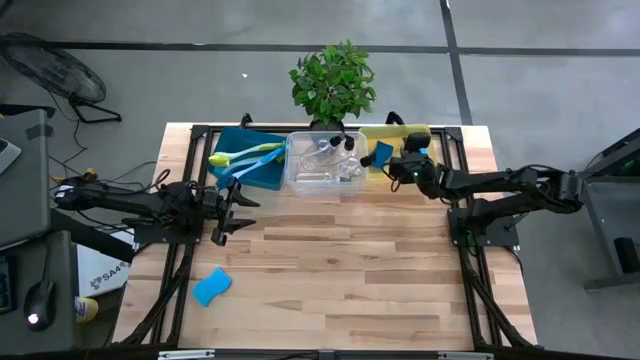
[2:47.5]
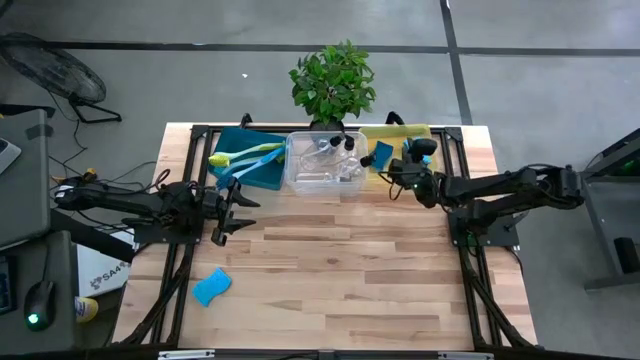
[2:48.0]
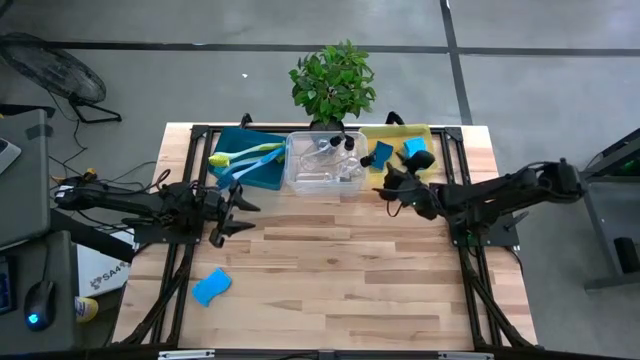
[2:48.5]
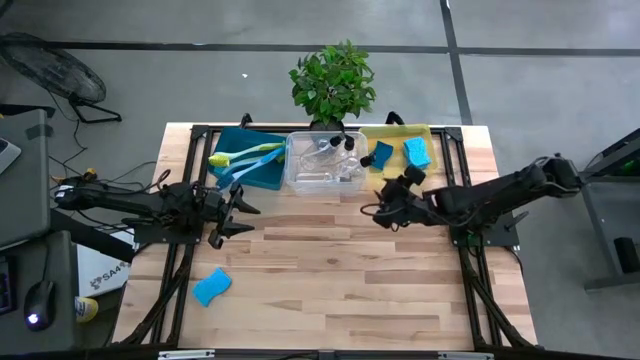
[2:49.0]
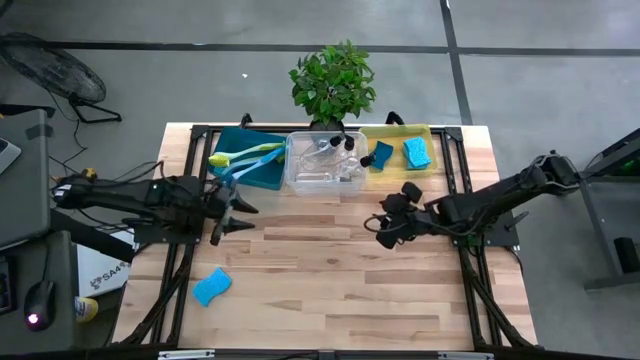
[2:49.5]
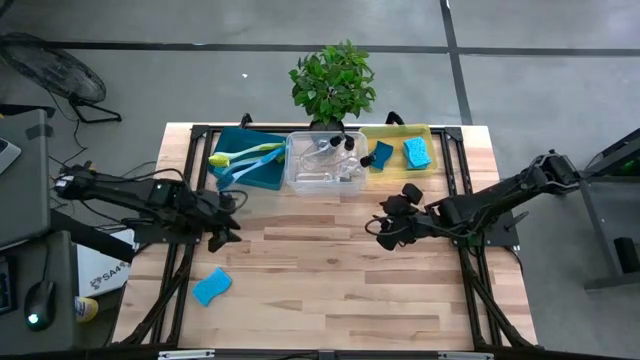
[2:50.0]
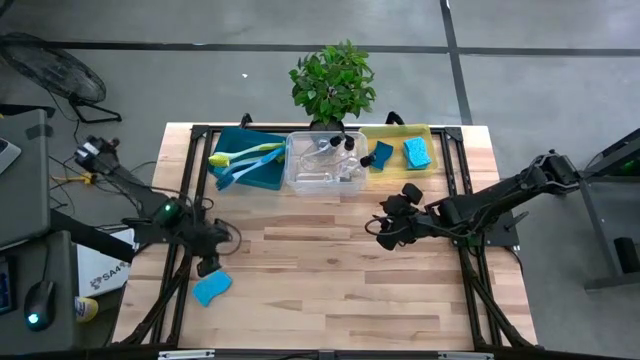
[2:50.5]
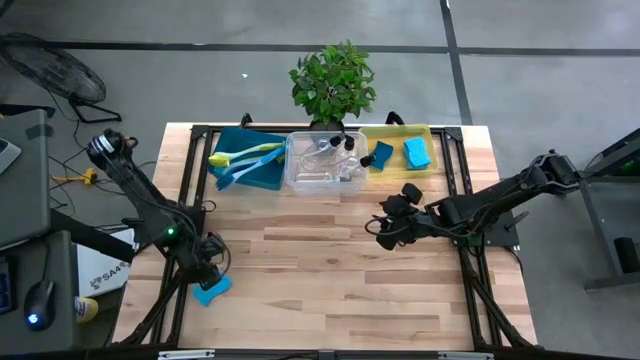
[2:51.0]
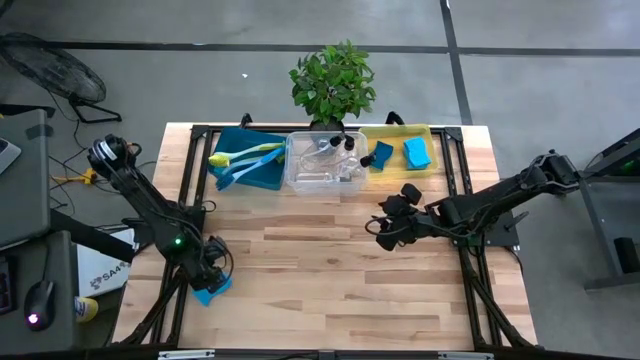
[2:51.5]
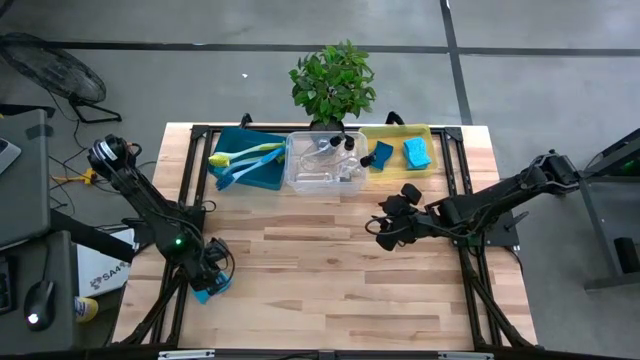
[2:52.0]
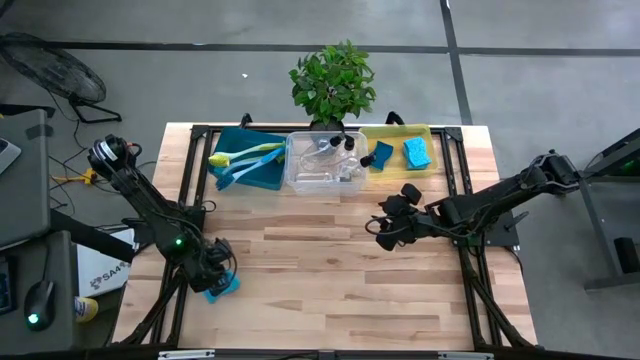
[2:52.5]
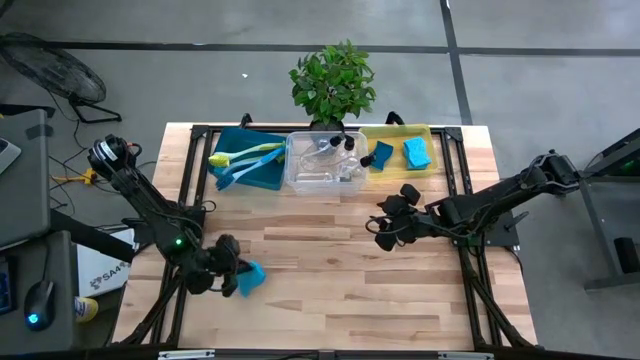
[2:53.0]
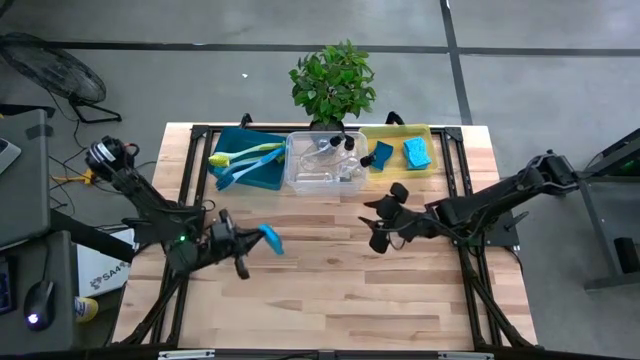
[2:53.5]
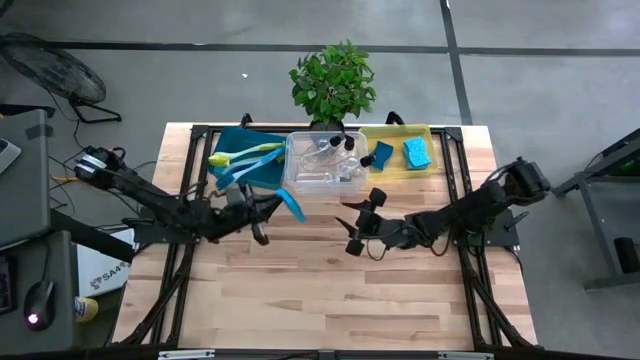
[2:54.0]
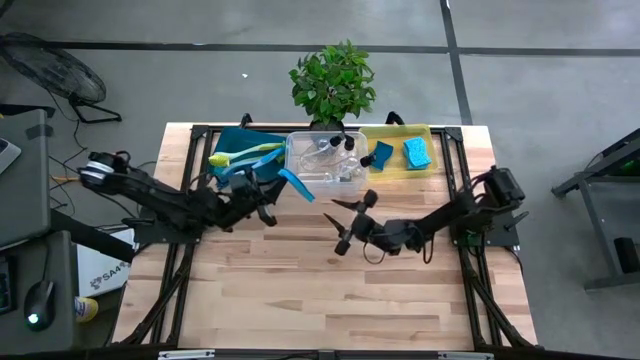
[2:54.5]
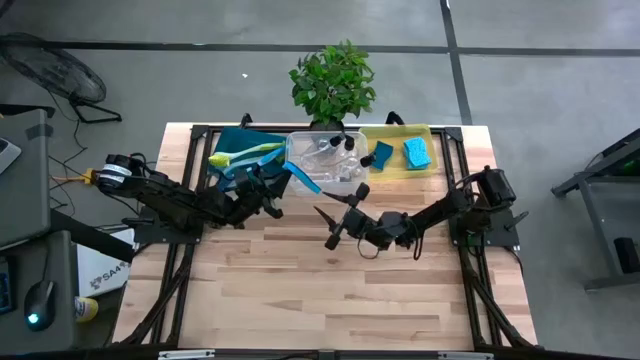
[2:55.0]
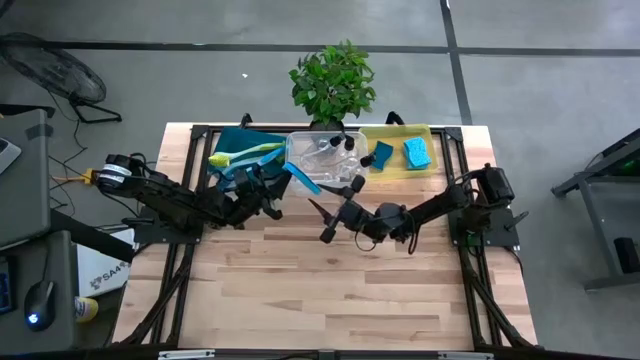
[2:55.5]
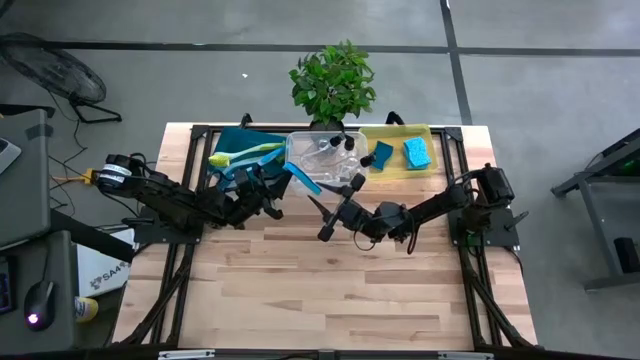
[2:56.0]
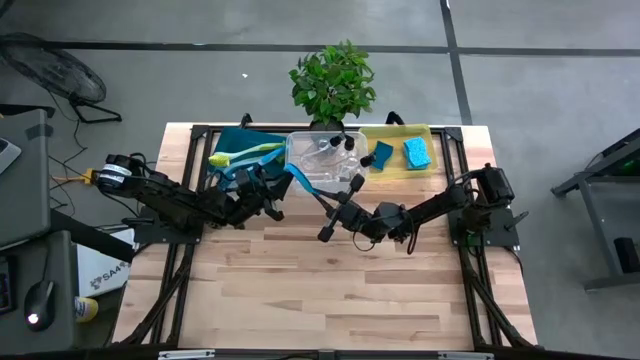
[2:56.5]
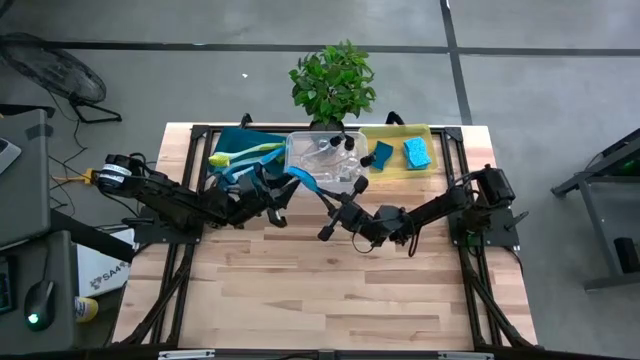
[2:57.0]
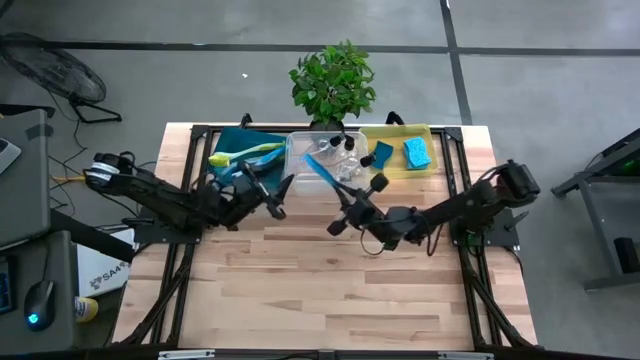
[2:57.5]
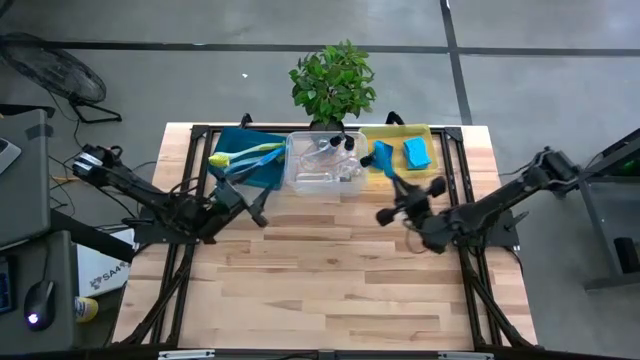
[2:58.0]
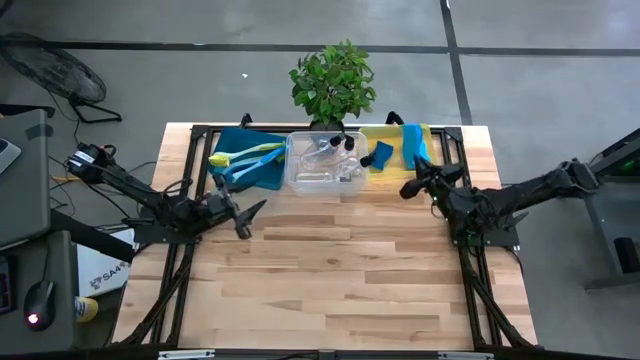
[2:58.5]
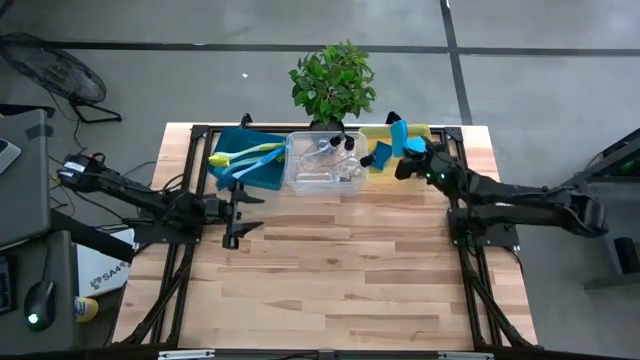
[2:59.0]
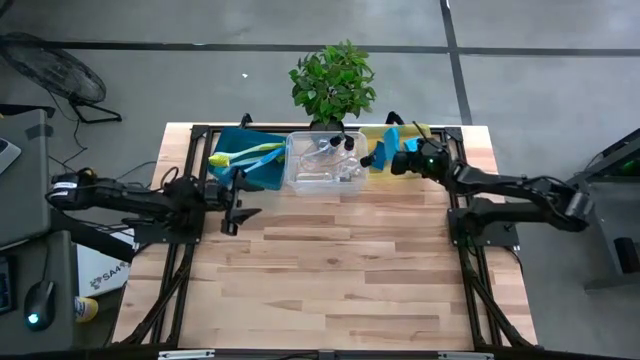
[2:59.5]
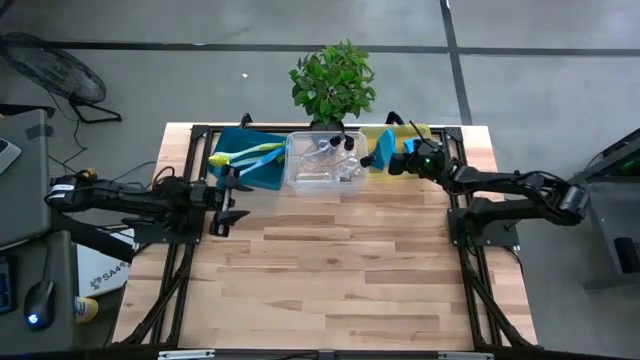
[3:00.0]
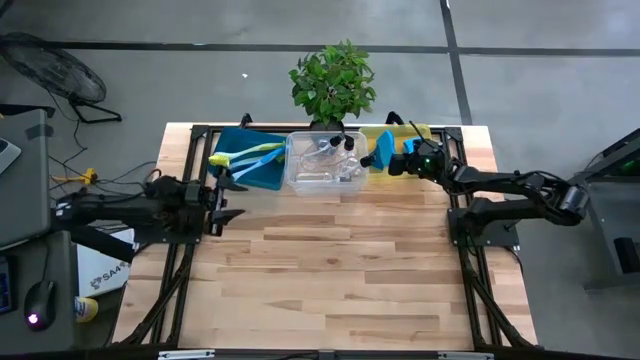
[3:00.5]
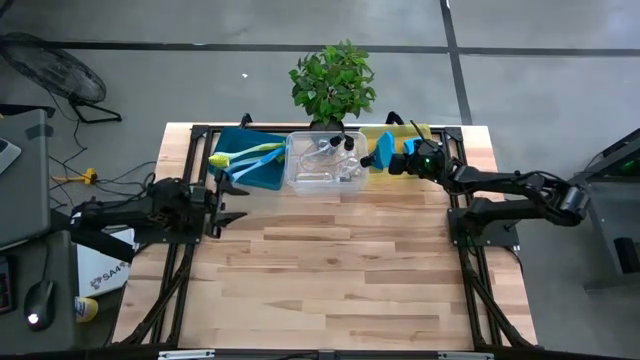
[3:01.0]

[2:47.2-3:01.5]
Task: Pick & Place Kitchen Sink Supplies
Put the light blue sponge into the yellow bin

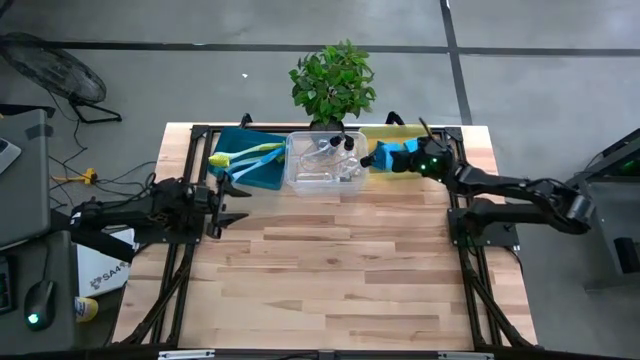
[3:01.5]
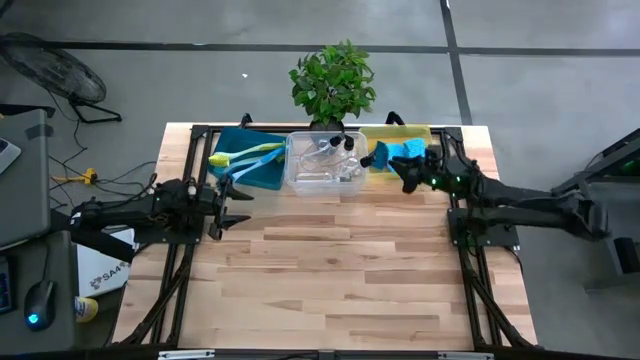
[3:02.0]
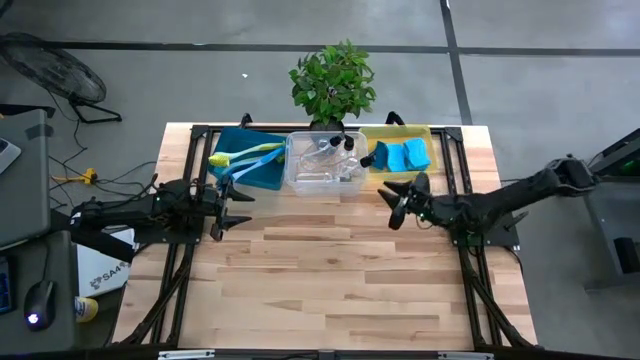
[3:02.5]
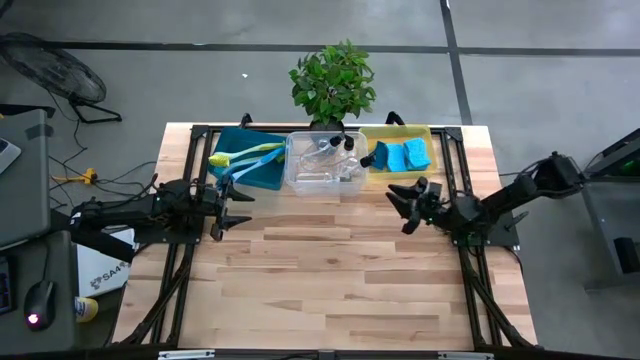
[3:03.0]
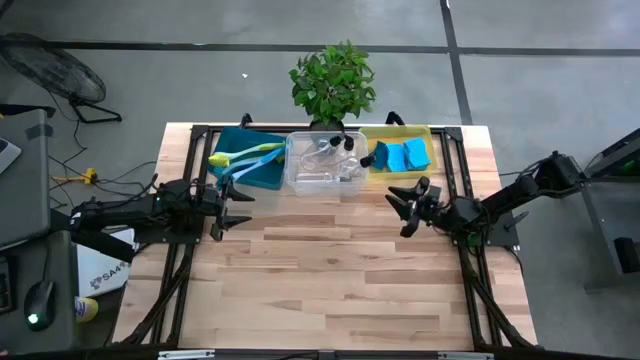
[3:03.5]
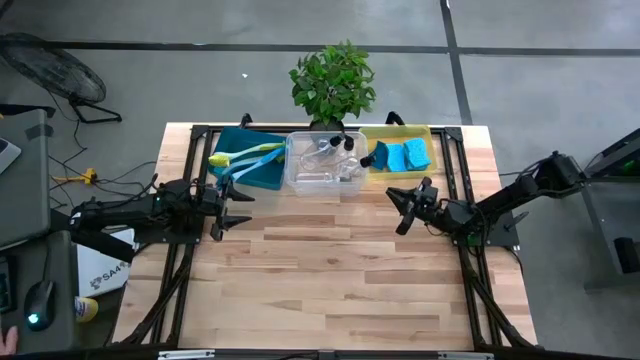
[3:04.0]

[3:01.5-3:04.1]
Return to Home Position

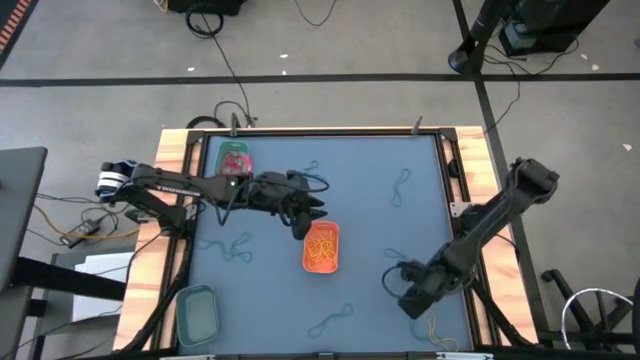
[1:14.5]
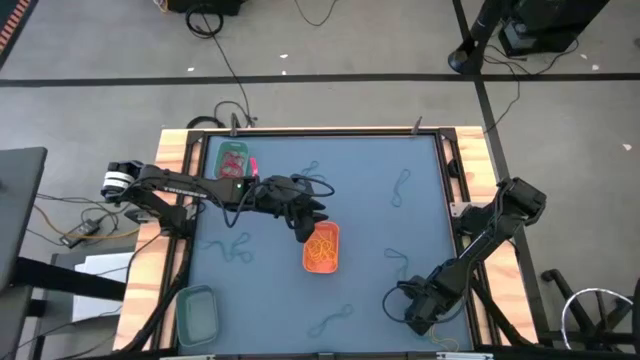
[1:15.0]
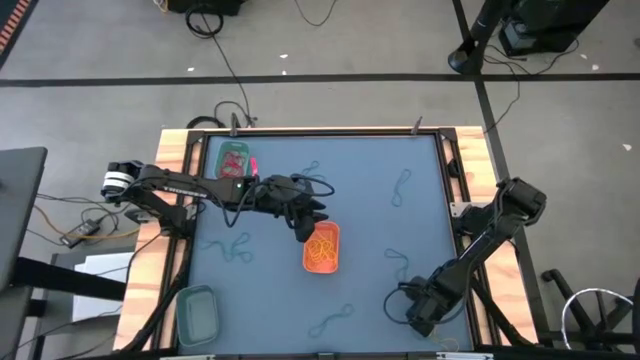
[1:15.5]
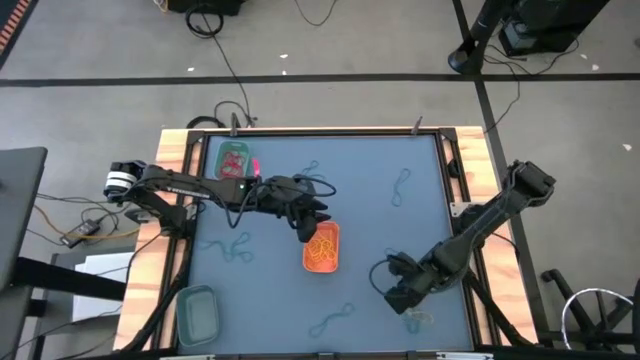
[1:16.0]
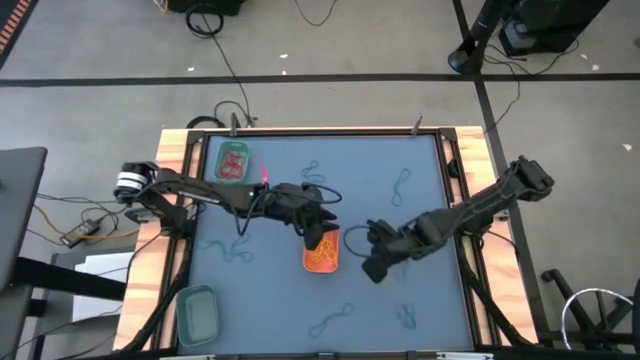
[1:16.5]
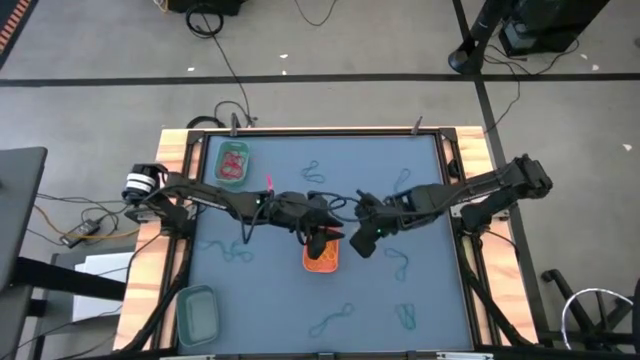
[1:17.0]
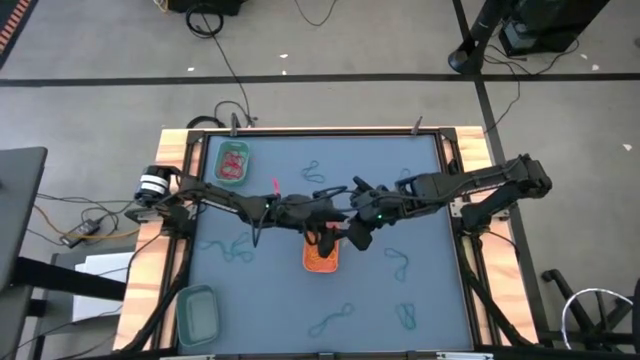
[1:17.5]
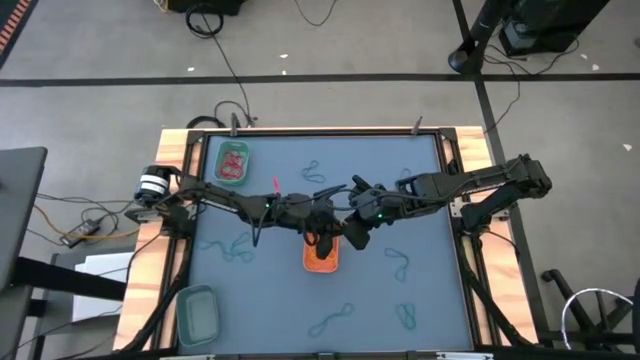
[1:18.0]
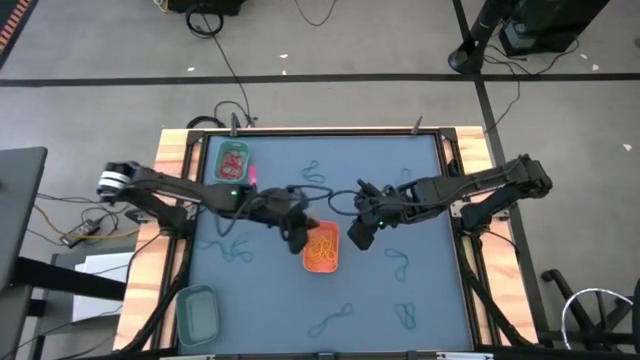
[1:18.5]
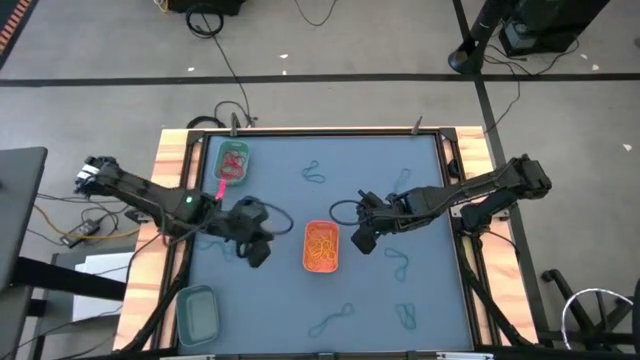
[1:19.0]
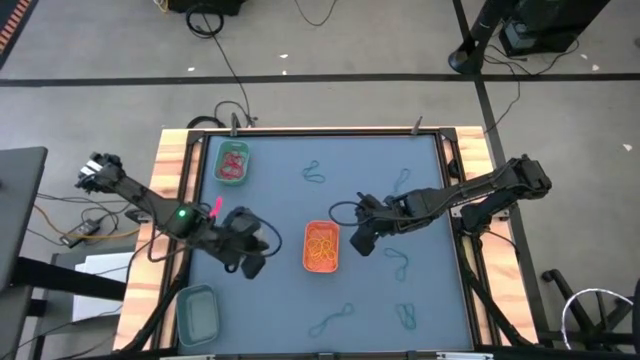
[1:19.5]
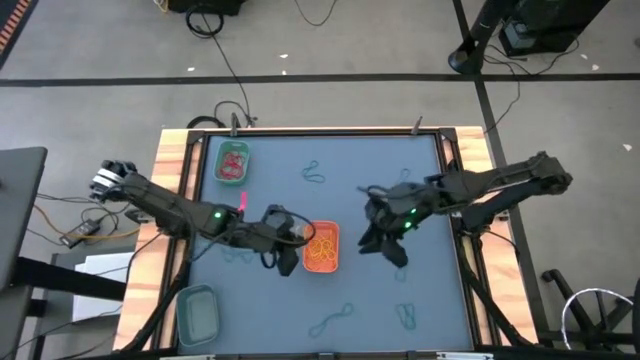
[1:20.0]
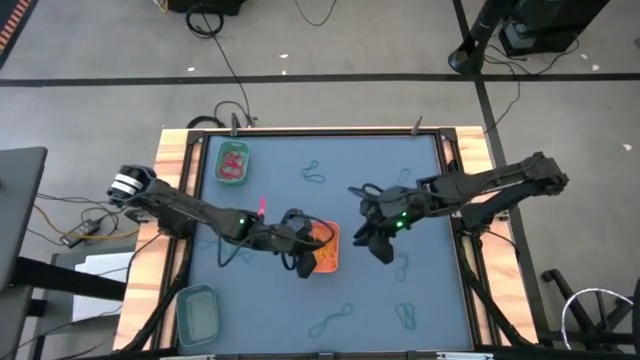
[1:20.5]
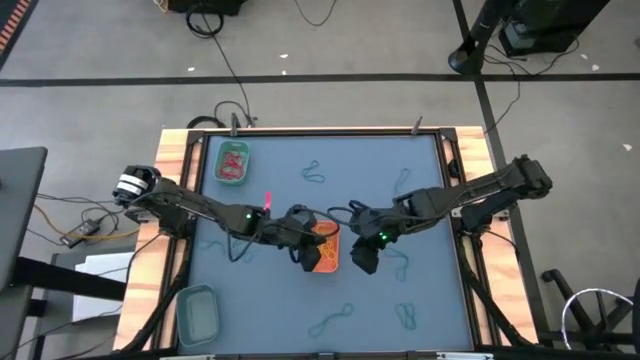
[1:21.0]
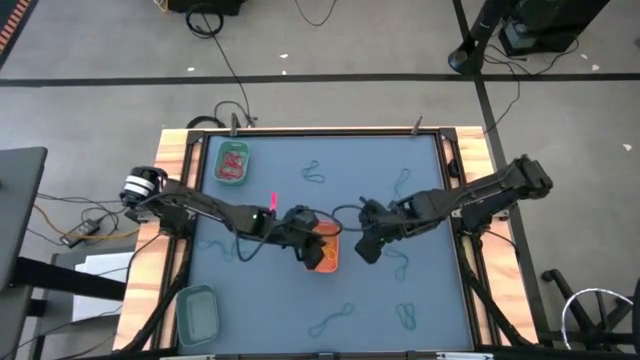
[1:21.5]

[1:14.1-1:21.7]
Task: Sort rubber bands into baskets
Put the yellow rubber band into the orange bin
